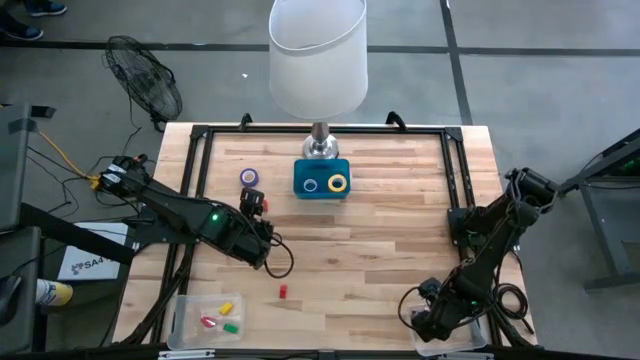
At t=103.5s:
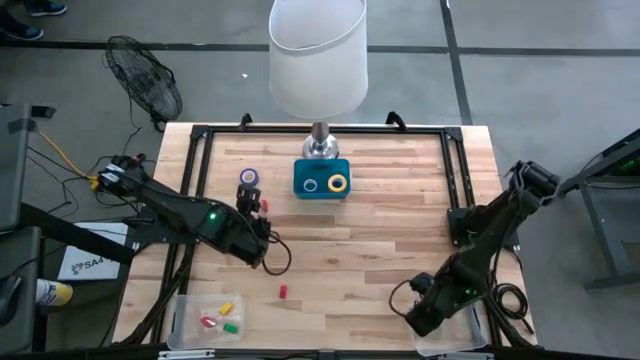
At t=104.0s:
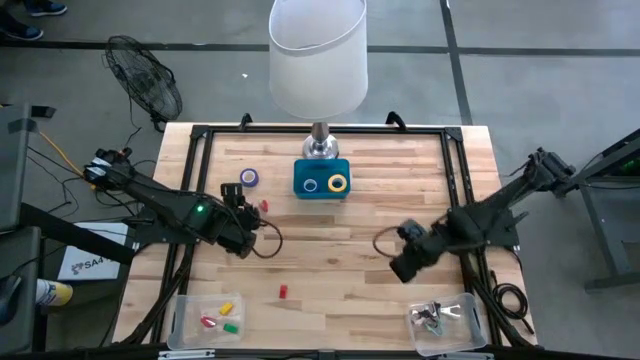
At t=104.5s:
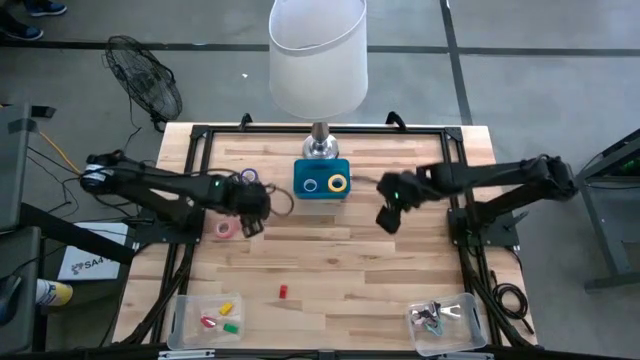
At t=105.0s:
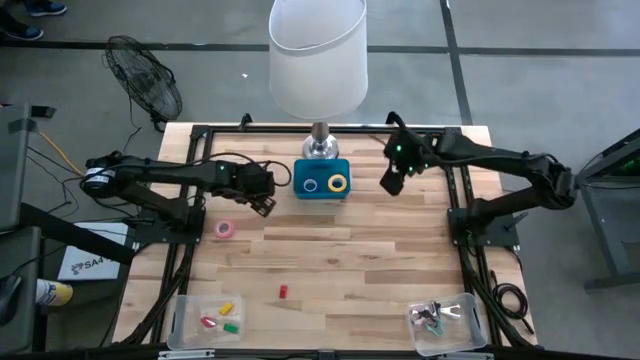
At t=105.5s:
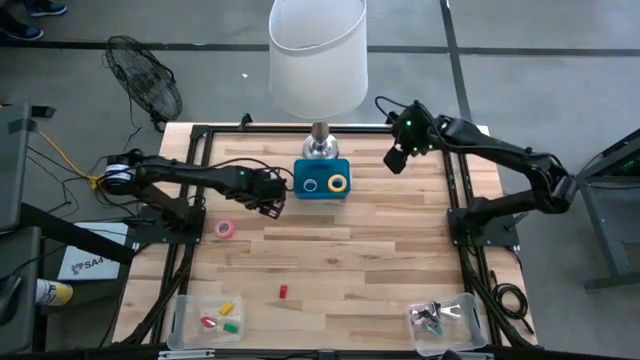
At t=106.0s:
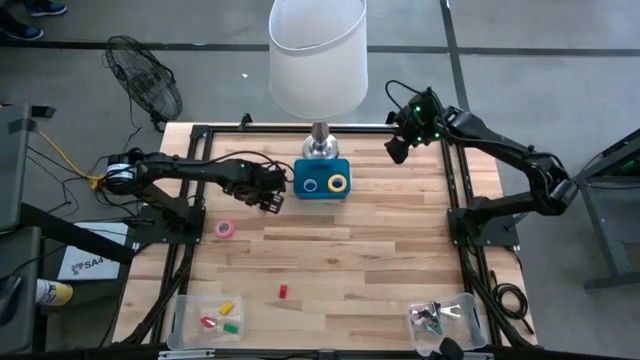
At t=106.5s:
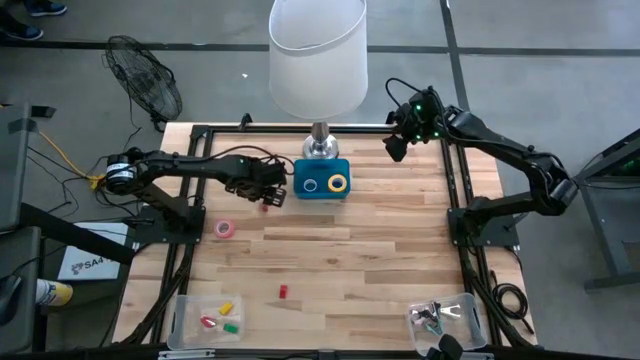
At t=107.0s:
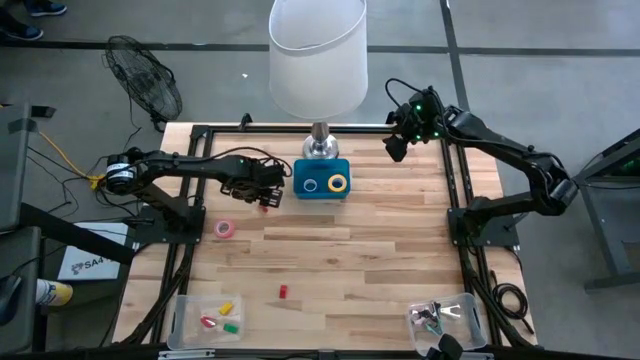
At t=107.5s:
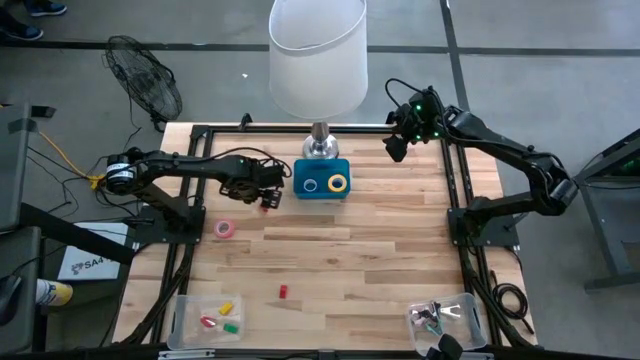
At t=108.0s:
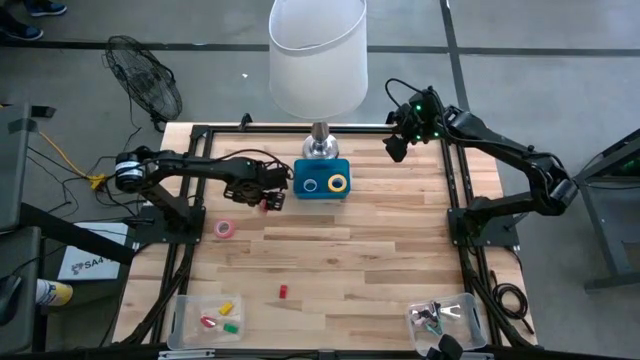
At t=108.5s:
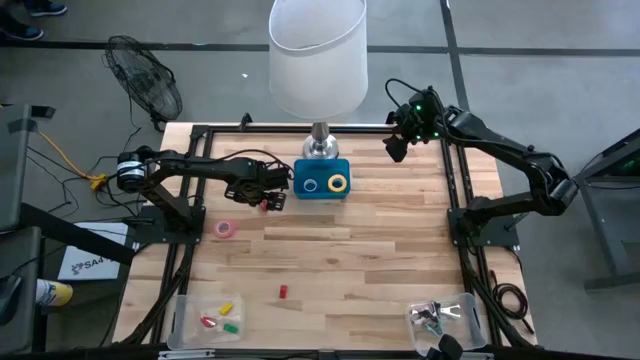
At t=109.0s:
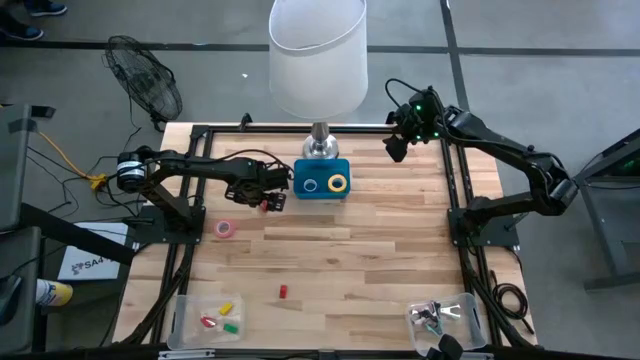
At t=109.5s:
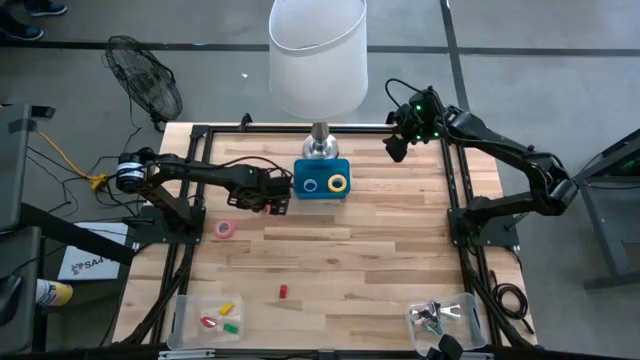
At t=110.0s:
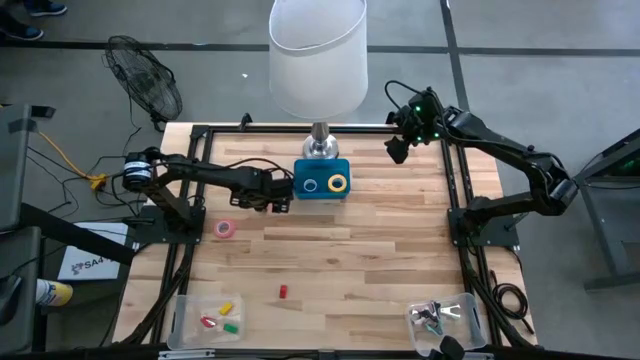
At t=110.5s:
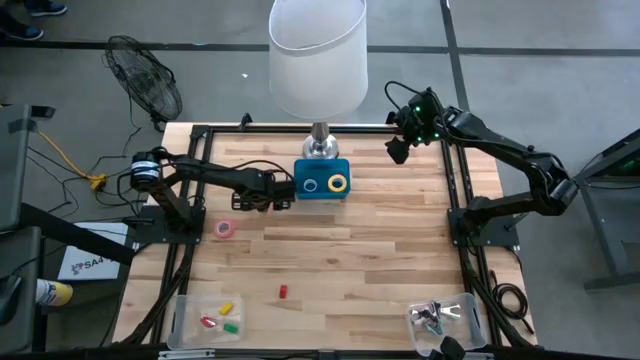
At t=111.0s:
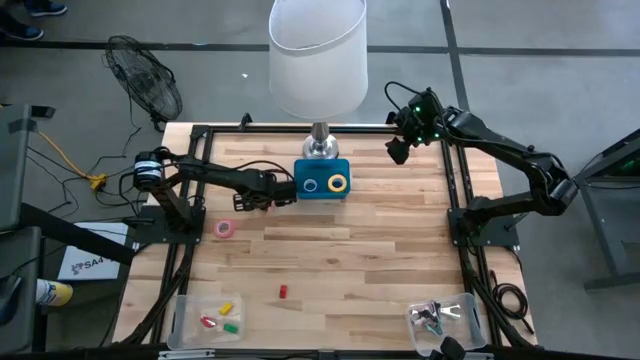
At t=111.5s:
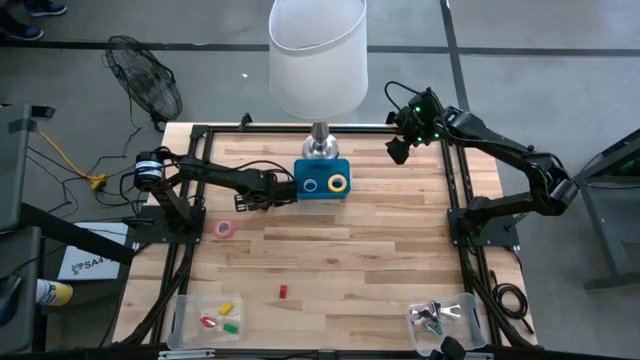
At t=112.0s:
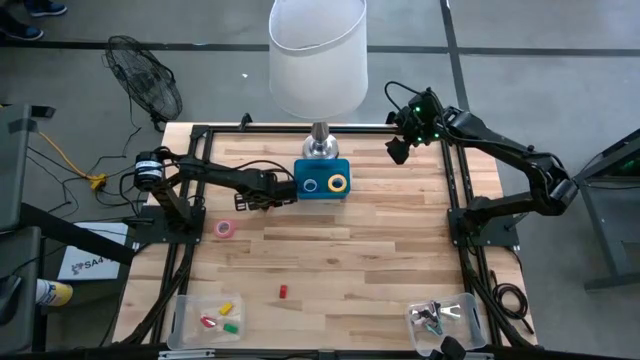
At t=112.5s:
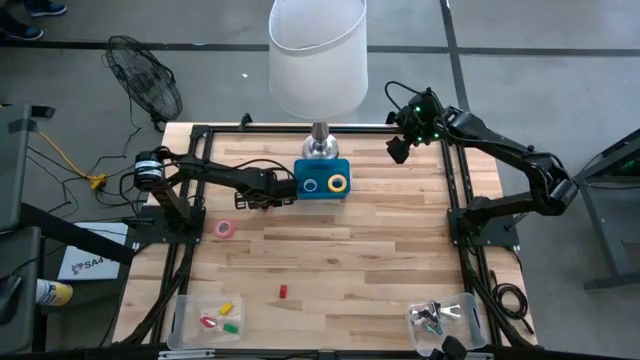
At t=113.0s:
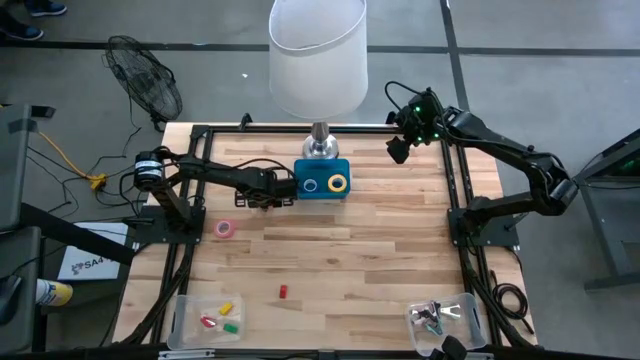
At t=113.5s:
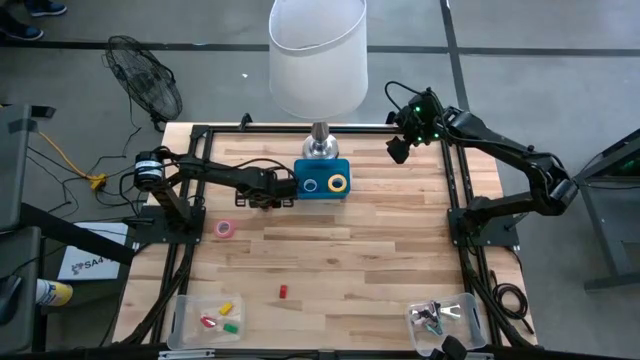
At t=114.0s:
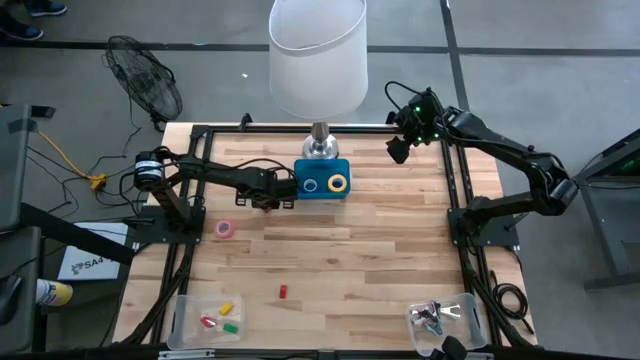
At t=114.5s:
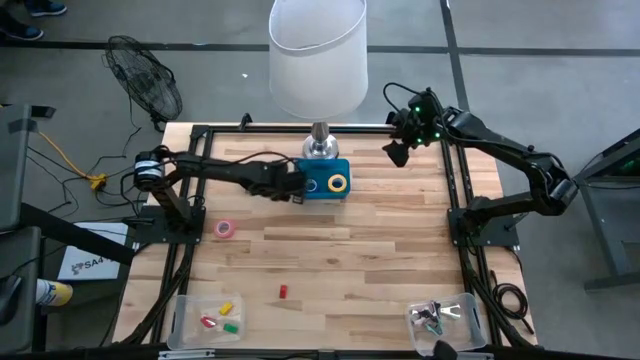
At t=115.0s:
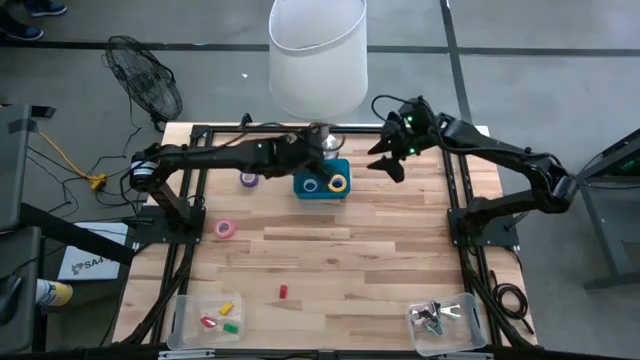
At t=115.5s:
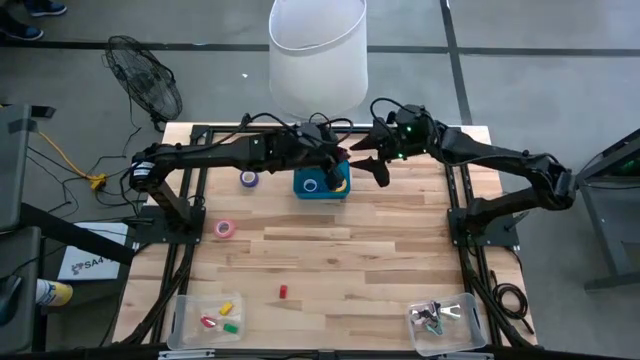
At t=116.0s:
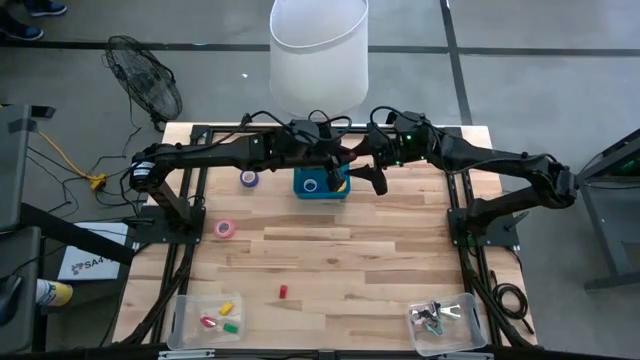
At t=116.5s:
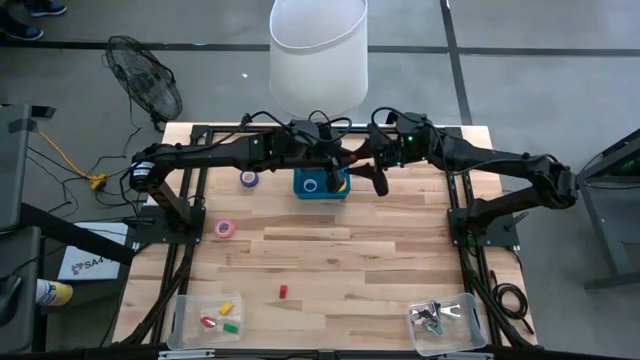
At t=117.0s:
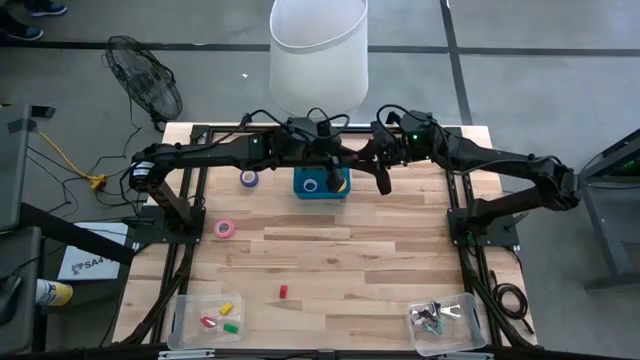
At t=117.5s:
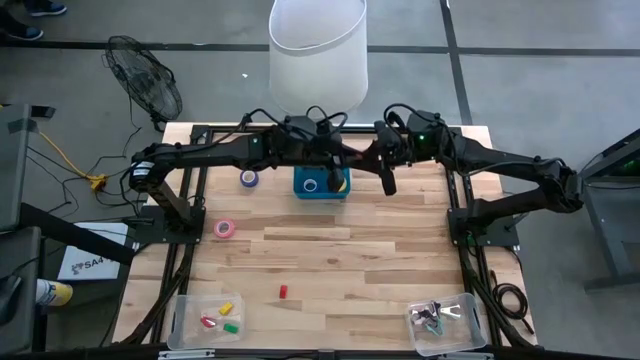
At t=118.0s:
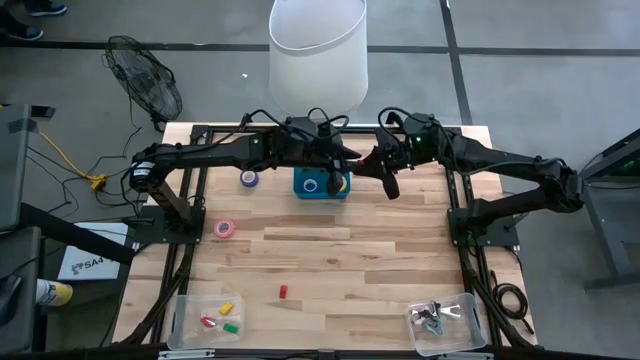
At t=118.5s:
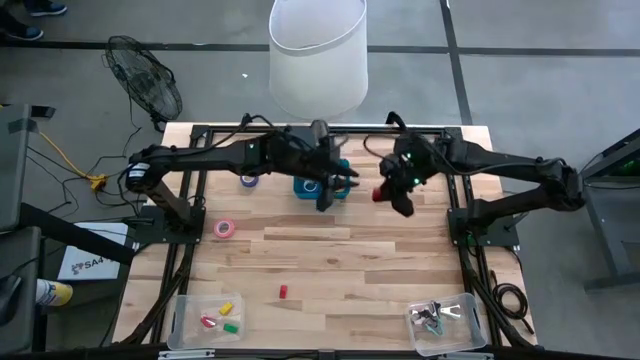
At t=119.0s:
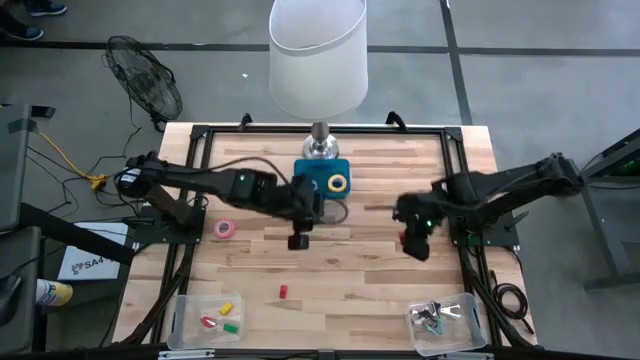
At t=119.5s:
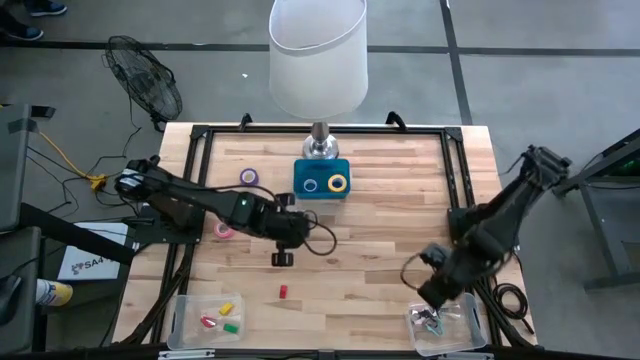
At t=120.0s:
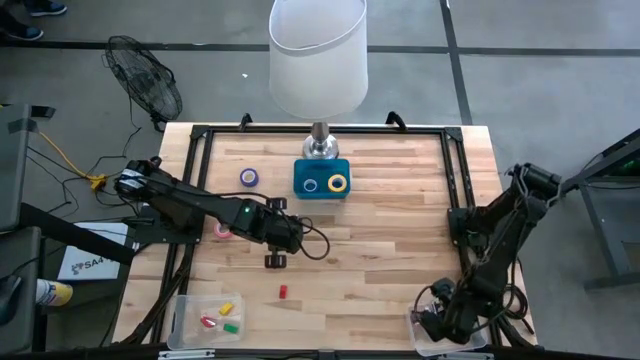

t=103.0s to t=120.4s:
Task: Pick and place Stapler, Stapler remover, tape
Put the top red stapler into the left transparent bin
